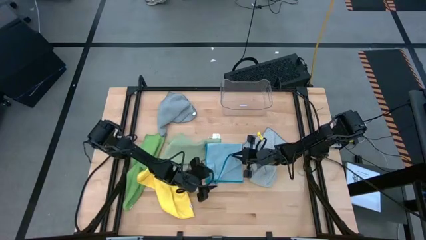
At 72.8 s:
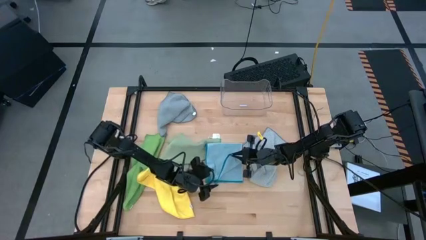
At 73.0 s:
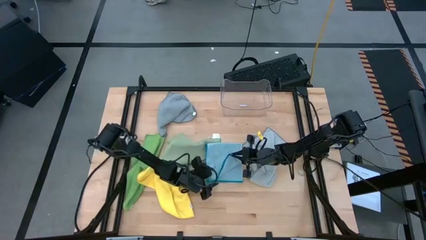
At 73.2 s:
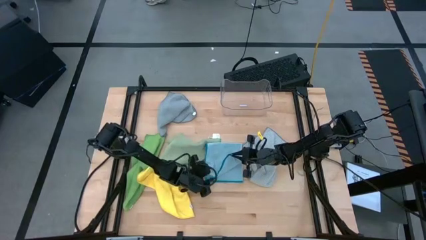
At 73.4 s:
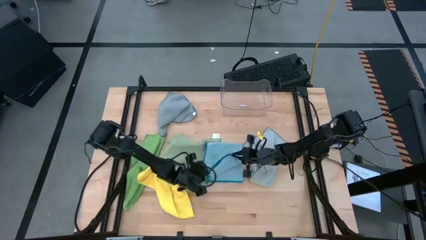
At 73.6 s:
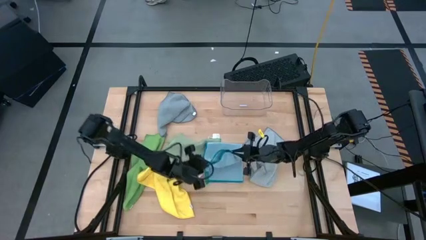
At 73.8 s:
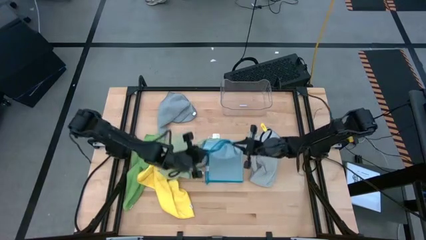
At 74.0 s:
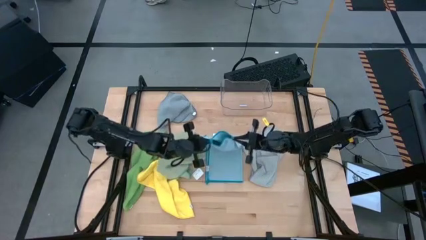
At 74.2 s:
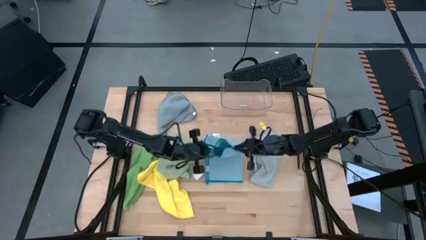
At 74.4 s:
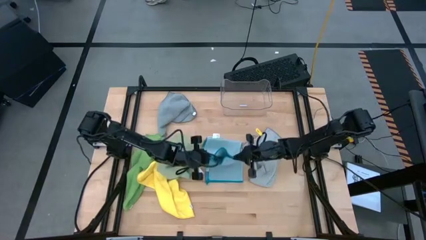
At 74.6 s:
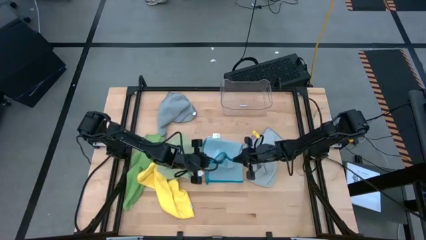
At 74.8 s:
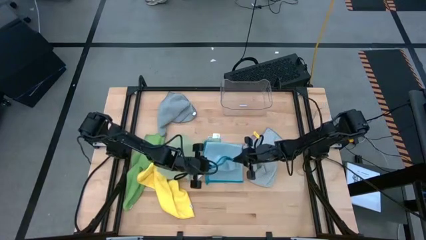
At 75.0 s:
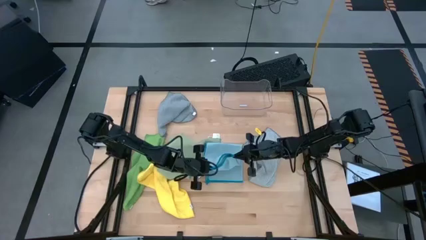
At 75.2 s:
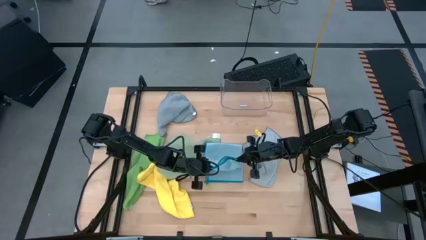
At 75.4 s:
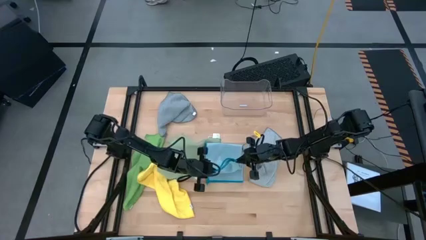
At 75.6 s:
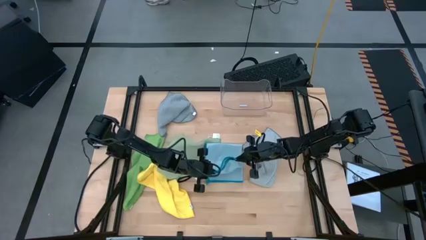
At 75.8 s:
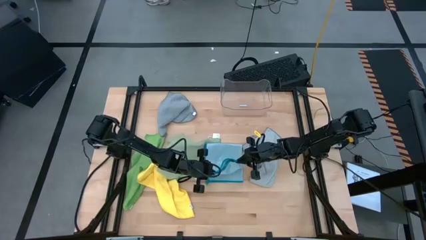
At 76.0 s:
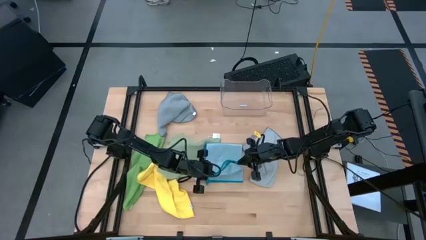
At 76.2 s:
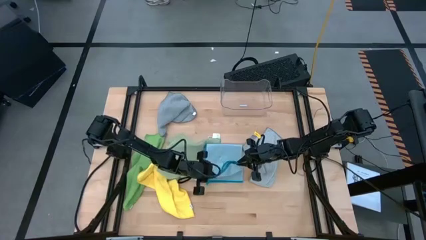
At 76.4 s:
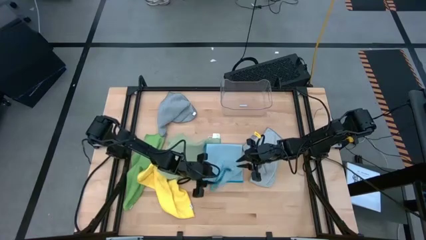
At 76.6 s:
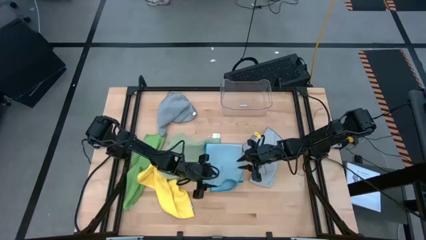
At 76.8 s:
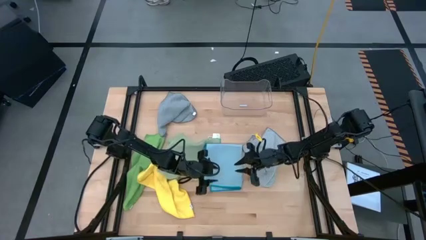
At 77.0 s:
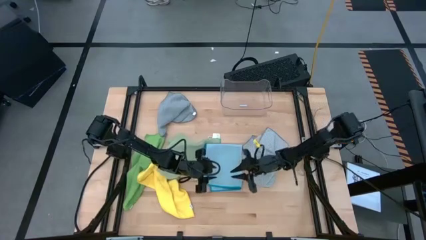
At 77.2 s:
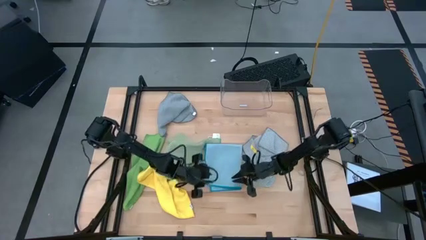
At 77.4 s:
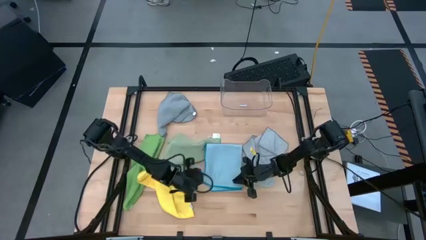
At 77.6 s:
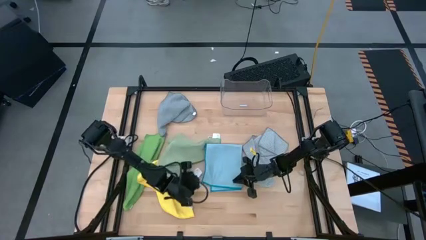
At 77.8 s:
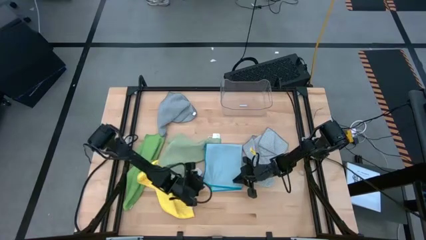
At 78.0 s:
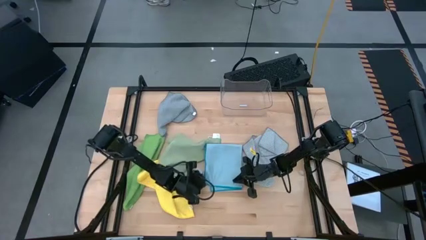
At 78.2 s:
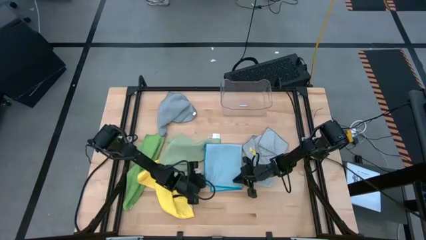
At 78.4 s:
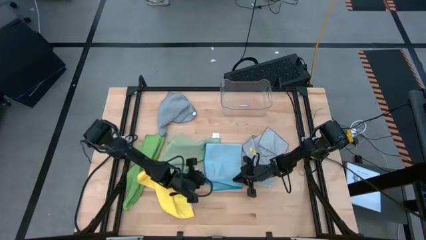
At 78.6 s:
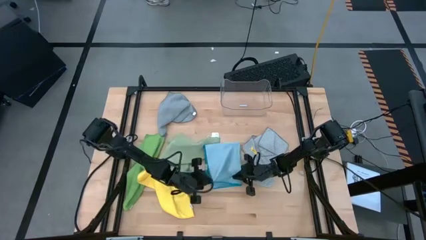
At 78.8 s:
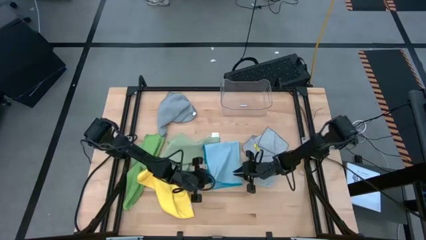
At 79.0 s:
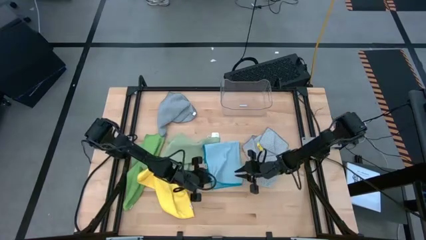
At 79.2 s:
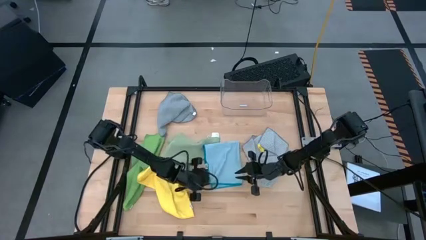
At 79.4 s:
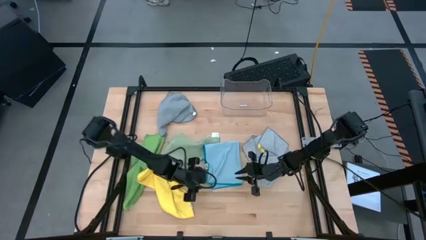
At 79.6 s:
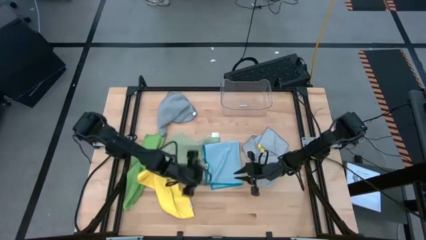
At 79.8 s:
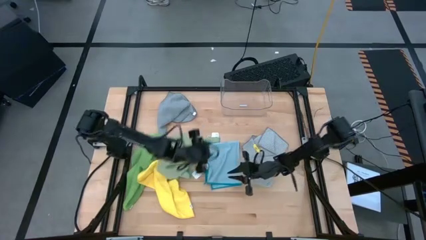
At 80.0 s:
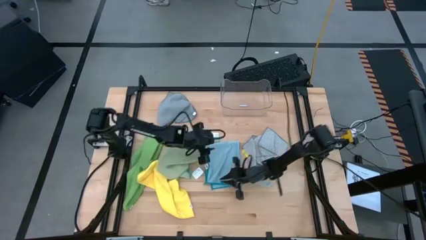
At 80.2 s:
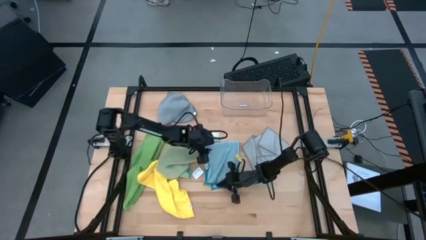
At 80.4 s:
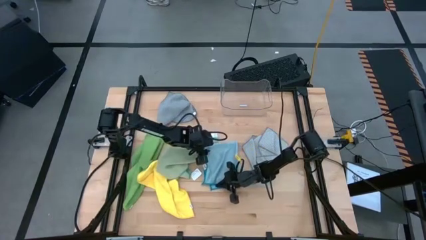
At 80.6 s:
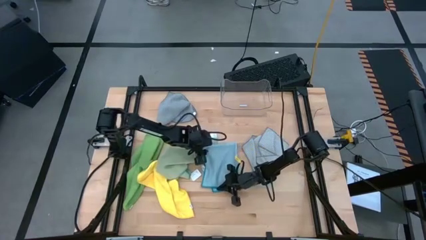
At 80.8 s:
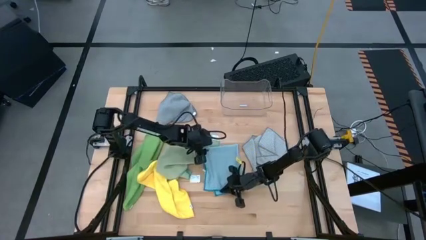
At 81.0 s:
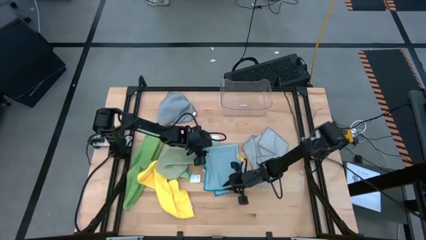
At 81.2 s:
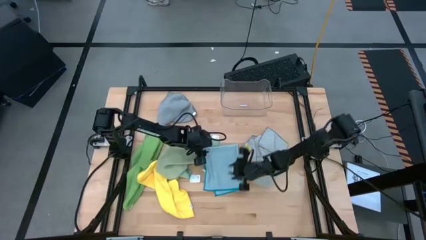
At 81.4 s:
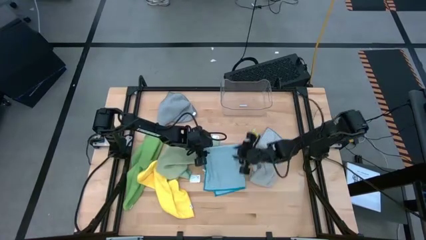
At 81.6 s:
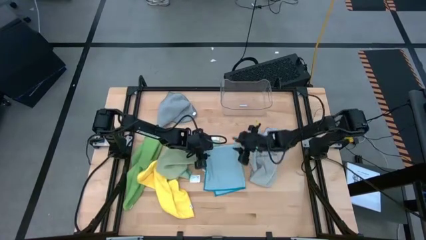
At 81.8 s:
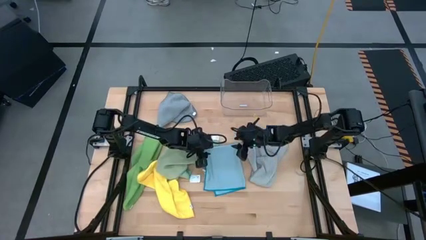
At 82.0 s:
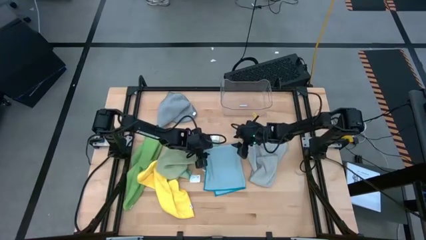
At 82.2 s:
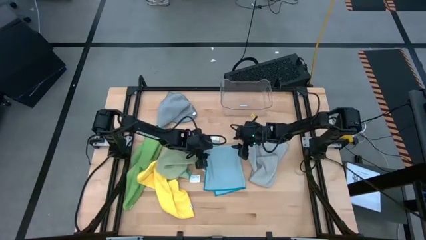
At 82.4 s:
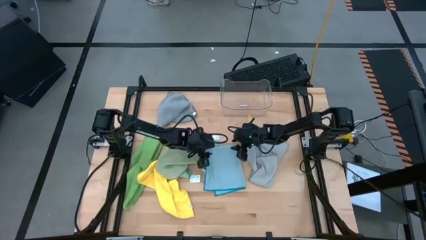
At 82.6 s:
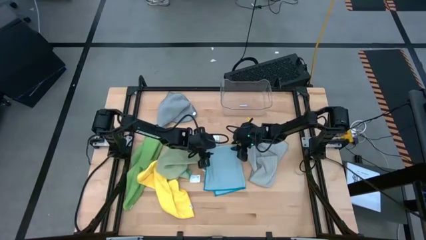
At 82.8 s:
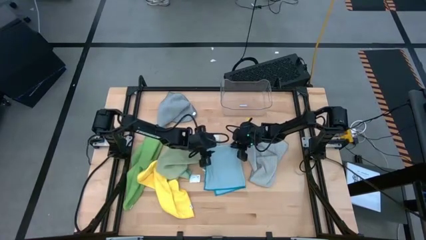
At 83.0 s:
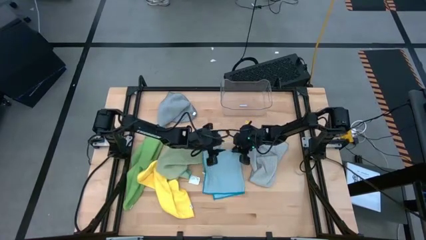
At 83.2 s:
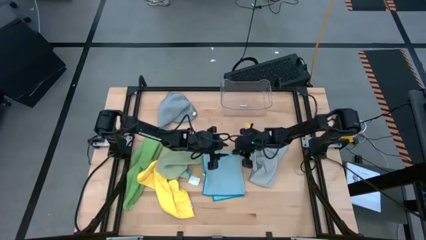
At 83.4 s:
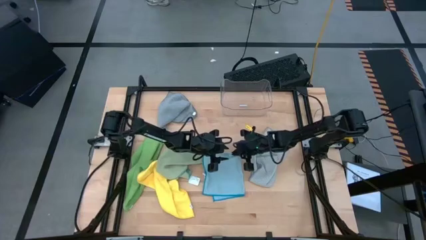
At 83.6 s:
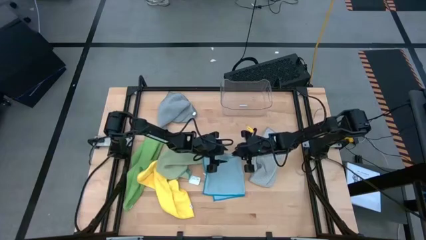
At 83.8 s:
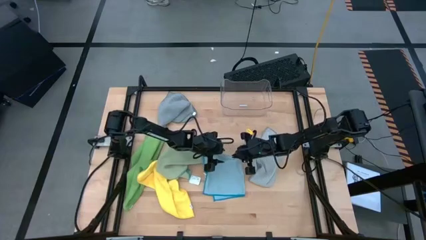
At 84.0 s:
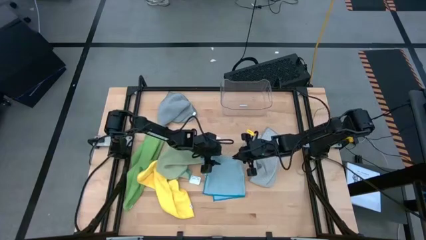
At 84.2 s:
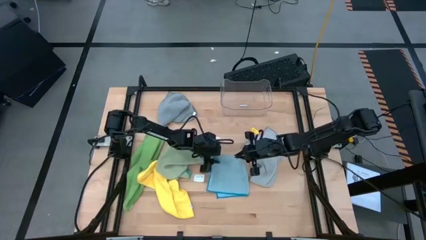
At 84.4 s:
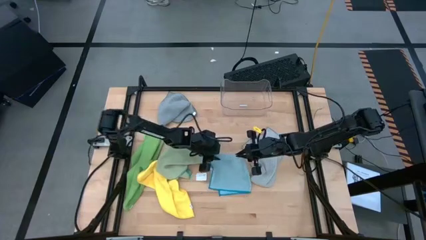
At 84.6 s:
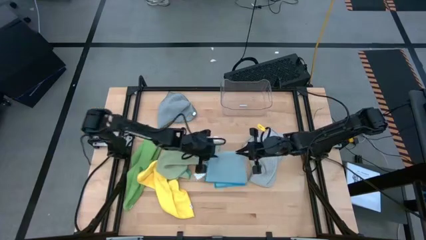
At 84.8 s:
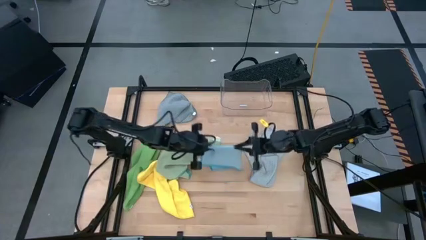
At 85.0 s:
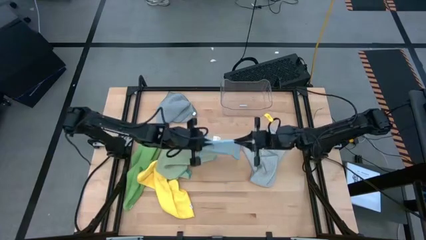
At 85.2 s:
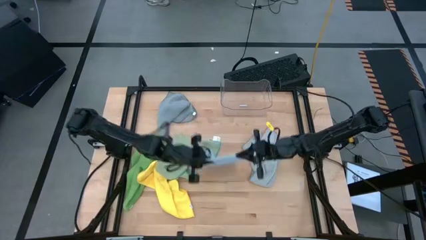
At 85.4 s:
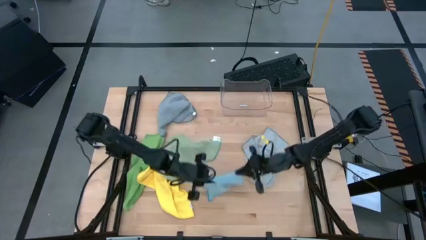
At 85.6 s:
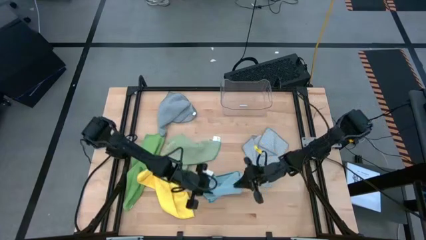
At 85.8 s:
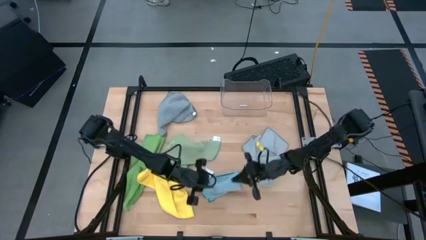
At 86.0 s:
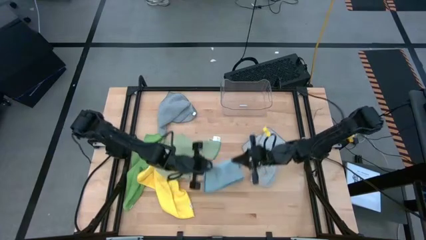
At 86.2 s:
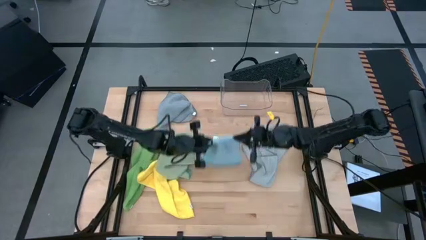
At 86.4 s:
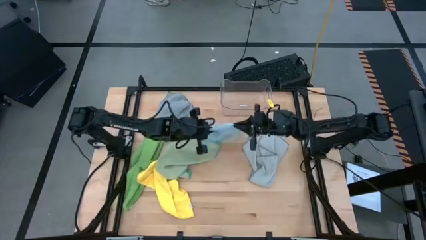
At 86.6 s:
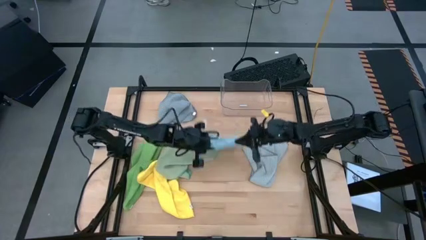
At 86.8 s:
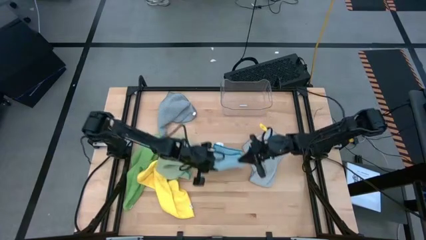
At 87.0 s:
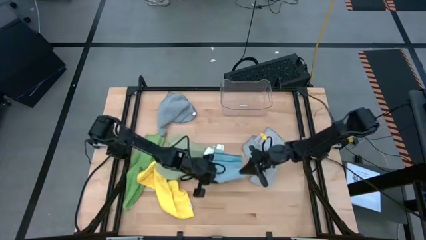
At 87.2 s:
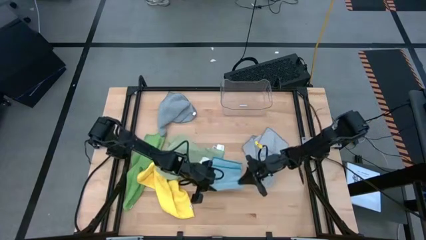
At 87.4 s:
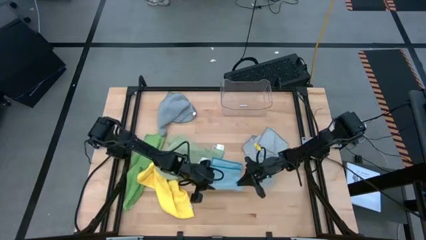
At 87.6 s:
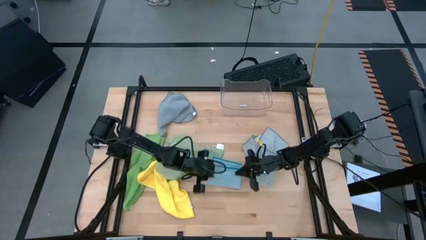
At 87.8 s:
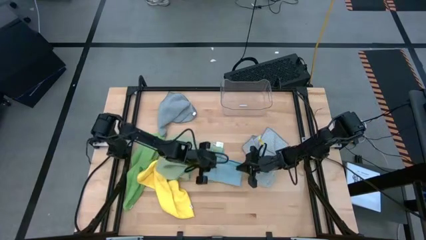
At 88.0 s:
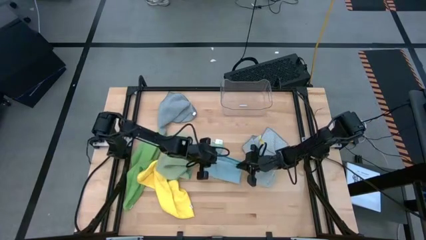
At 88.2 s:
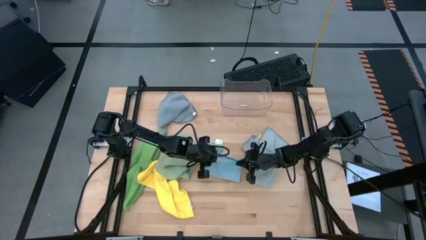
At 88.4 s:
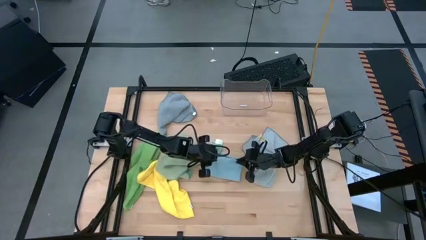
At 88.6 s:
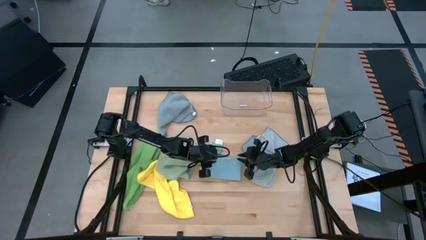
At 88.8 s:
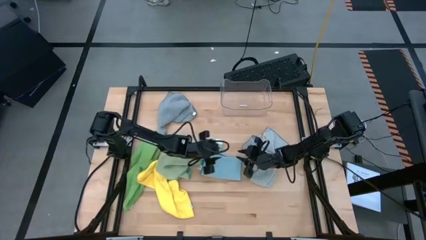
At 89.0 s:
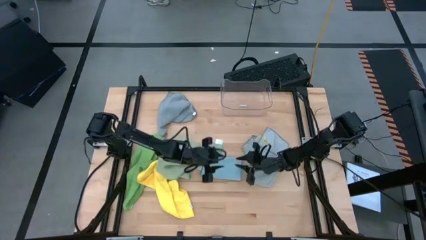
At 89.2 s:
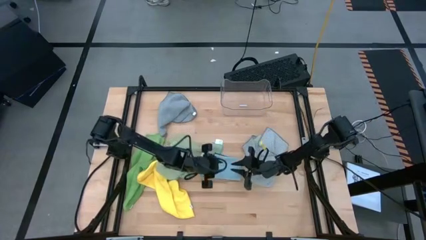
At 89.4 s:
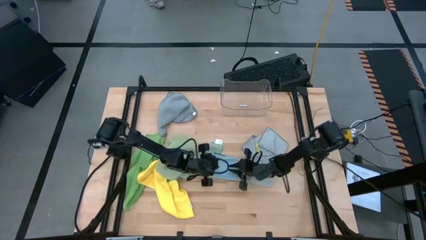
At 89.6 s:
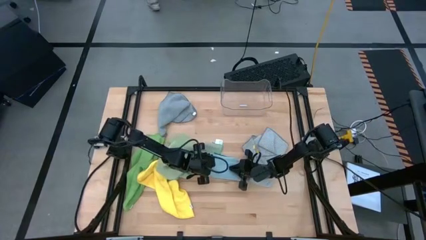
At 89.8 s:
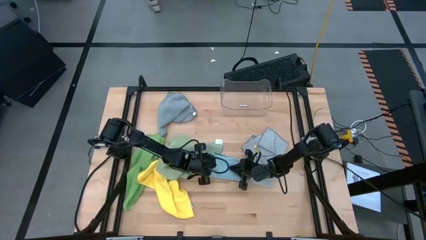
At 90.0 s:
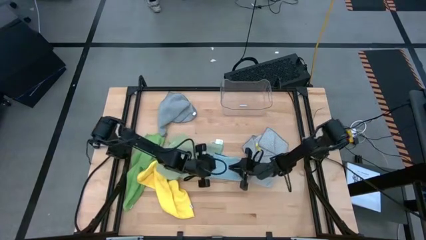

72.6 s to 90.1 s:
Task: Fold microfiber towels
Fold the blue towel

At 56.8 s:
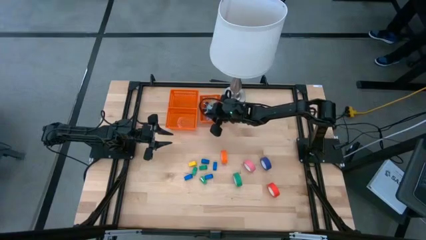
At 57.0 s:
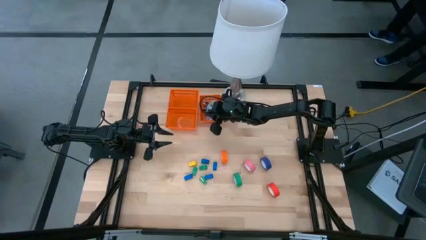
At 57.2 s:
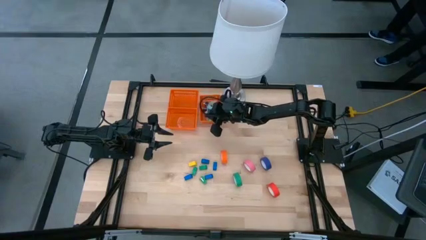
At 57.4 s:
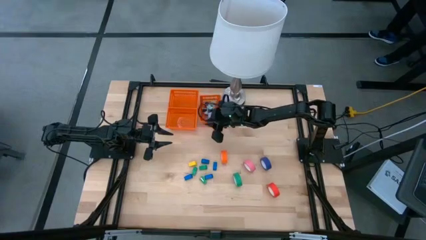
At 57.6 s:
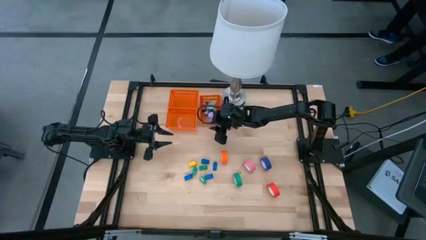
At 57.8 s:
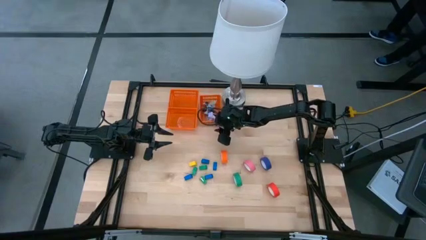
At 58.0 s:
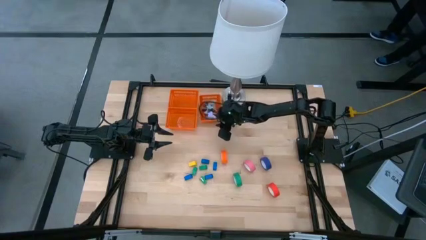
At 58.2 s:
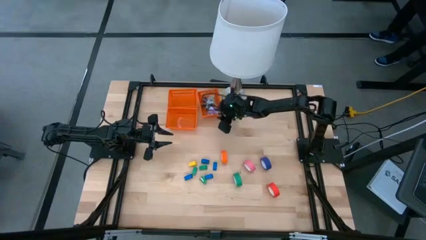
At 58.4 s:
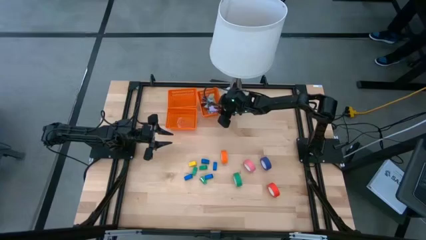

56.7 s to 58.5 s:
Task: Pick and place Stapler, Stapler remover, tape
Adjust the right orange basket
